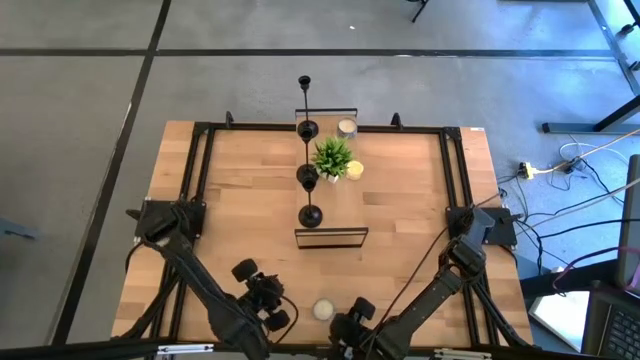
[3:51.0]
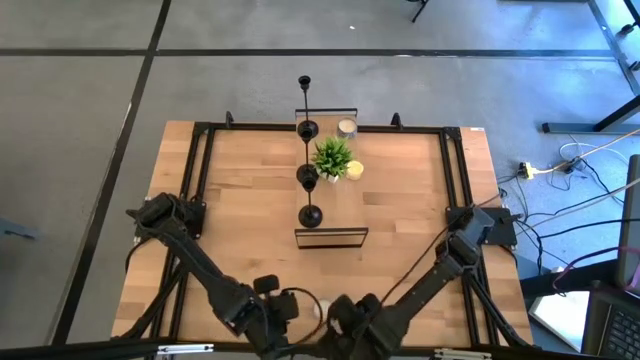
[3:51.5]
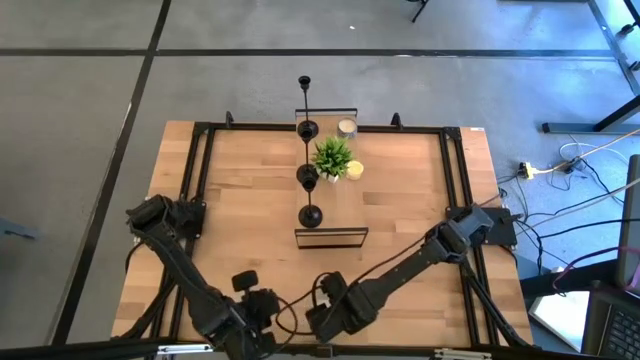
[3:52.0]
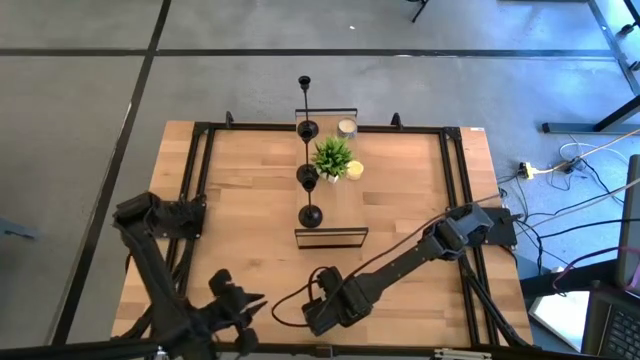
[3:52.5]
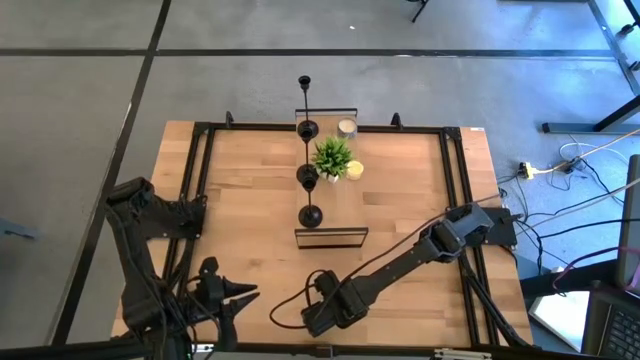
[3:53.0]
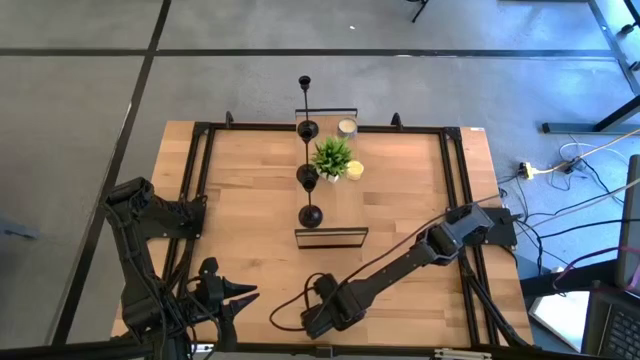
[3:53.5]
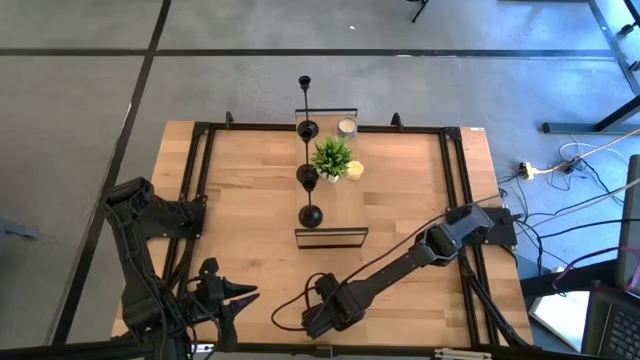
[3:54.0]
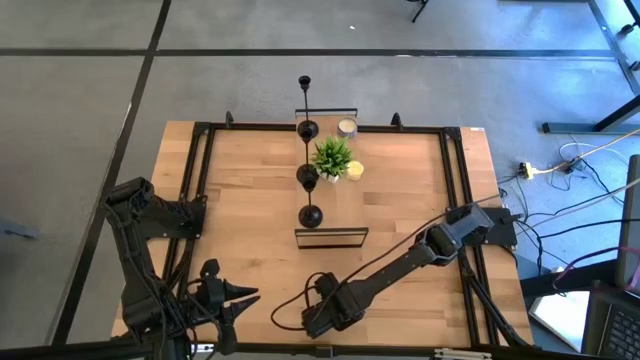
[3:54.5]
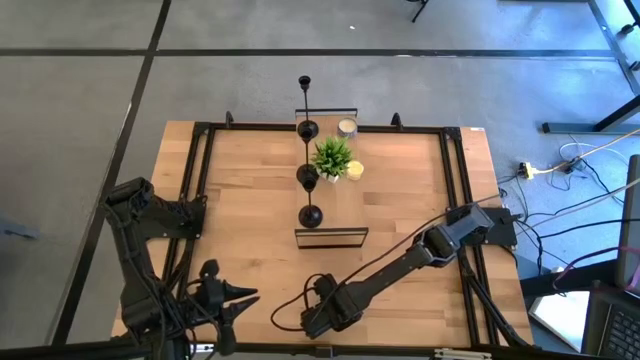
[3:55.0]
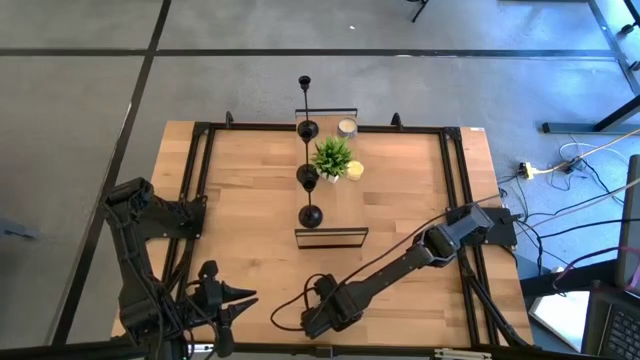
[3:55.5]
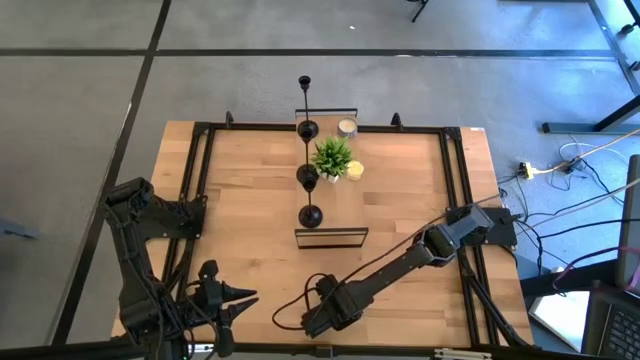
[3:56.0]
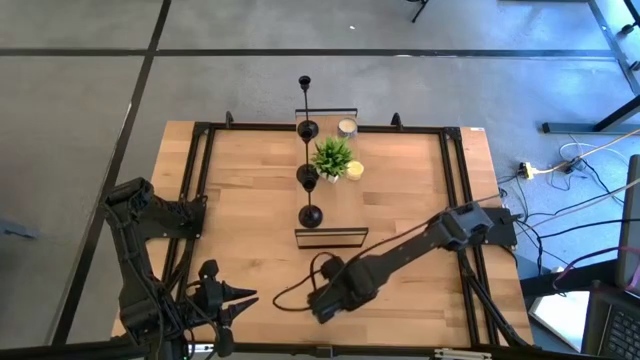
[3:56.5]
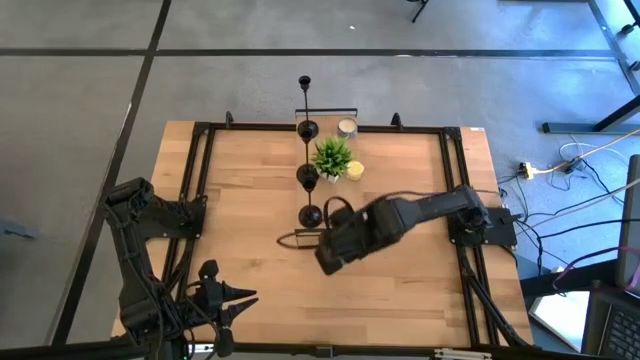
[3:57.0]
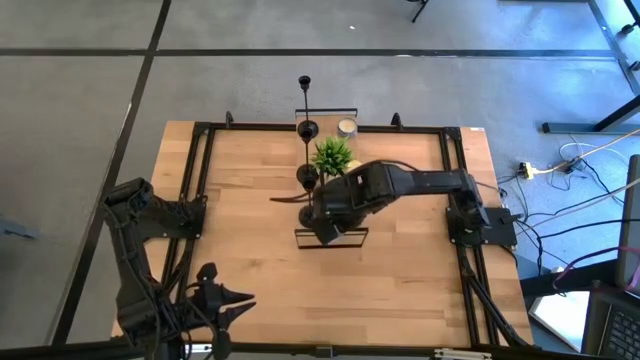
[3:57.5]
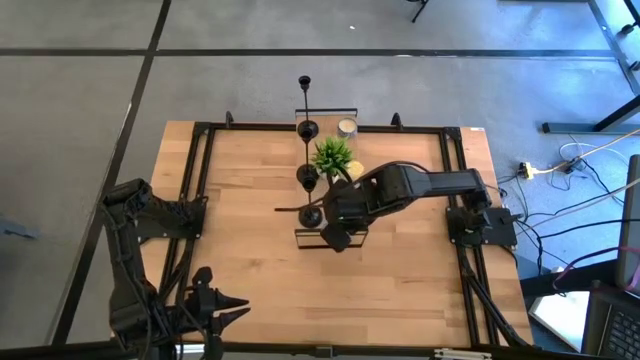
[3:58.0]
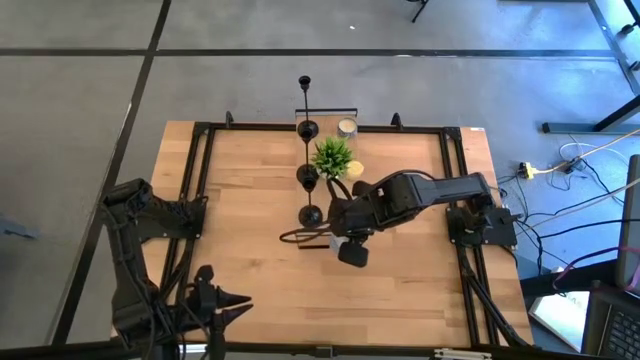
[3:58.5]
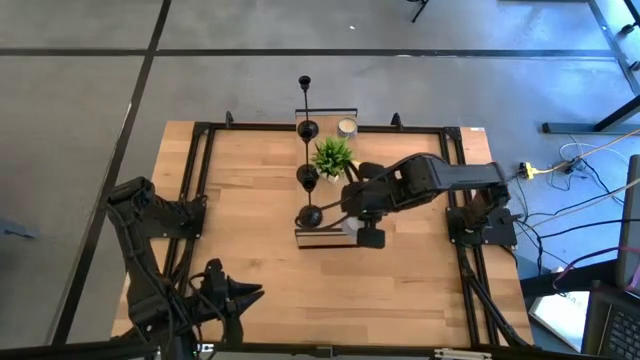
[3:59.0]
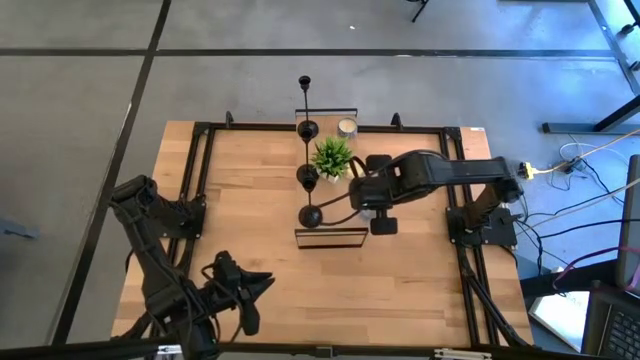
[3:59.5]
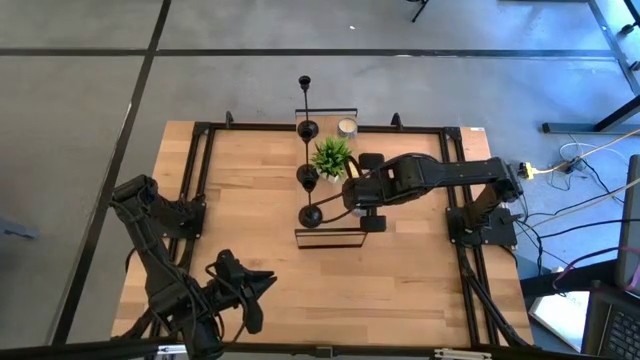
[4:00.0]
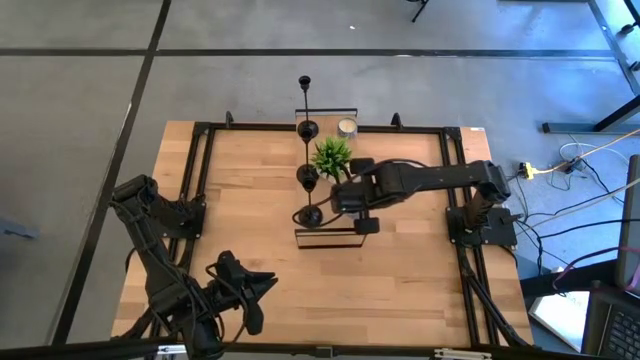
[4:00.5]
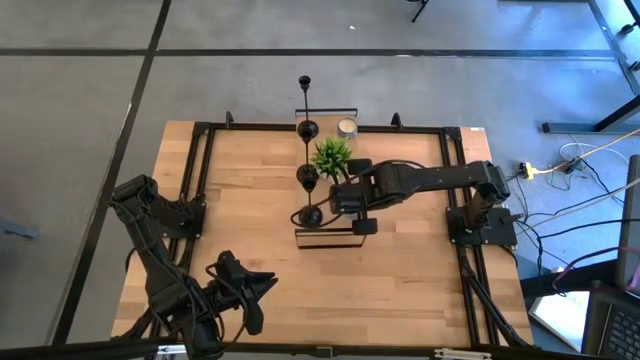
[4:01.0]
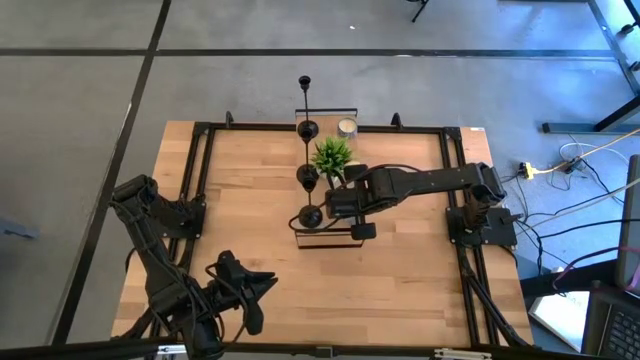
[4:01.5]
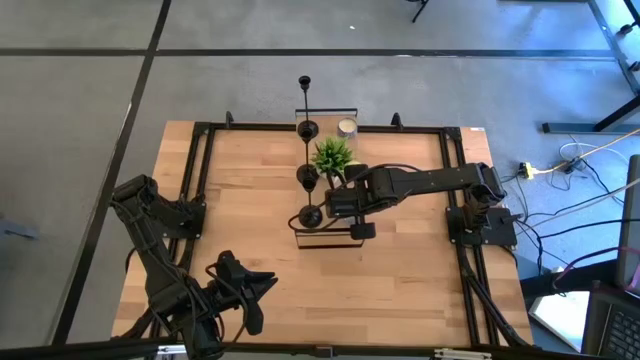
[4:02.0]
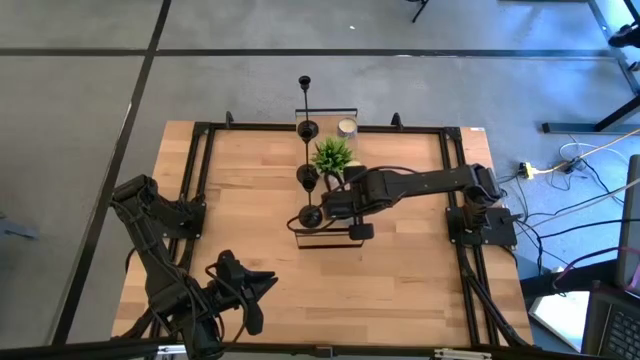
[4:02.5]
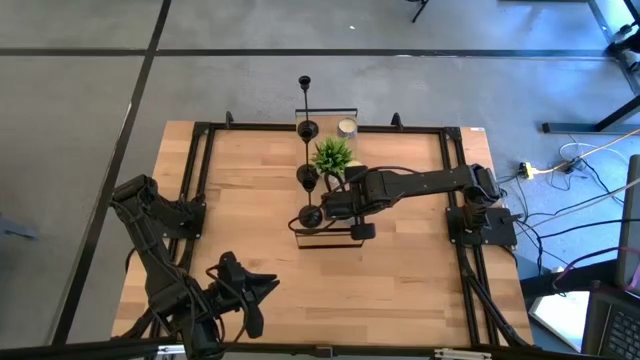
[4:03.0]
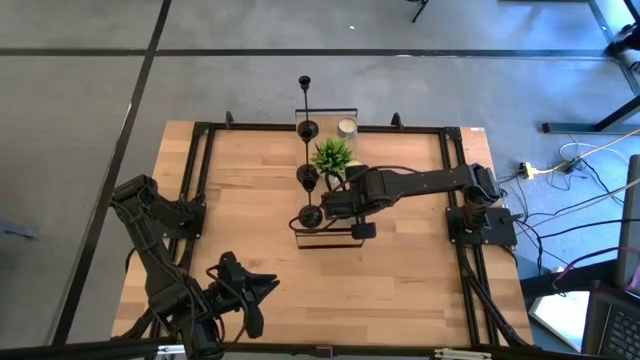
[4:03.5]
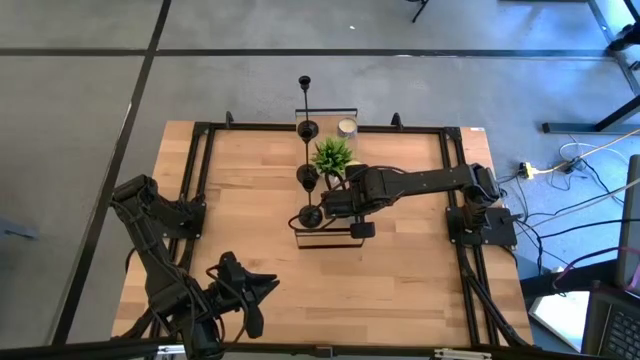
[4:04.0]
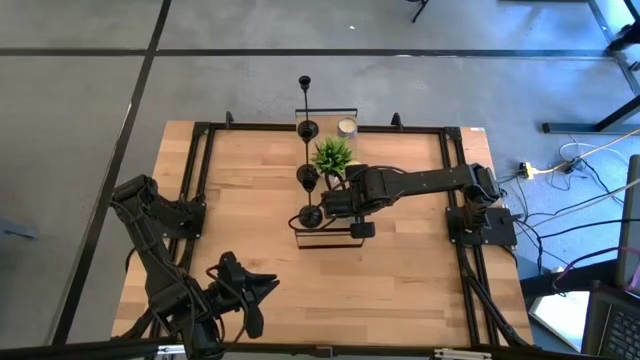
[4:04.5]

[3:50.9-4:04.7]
Task: Pick & Place candle stick holders
Put the blue scented candle on the shelf

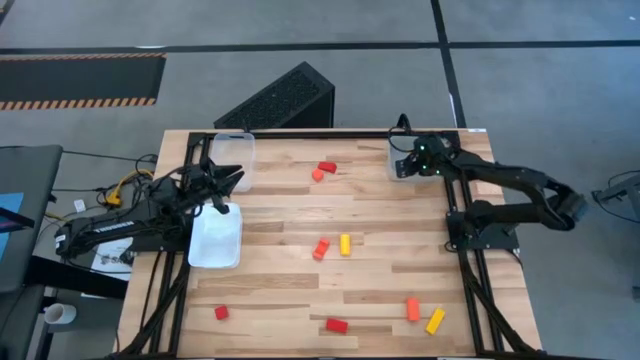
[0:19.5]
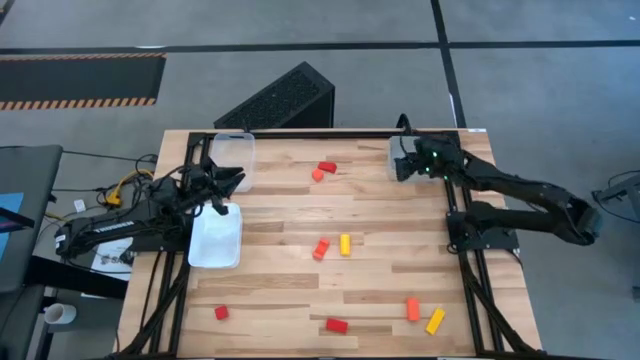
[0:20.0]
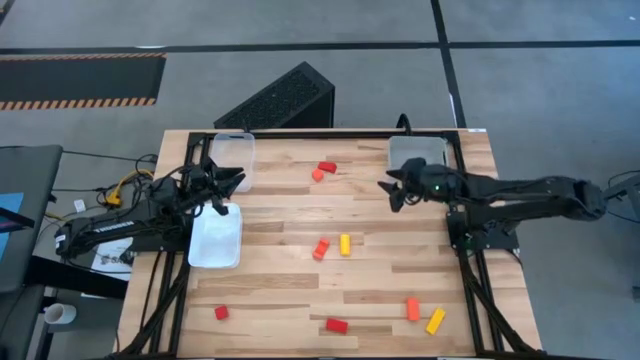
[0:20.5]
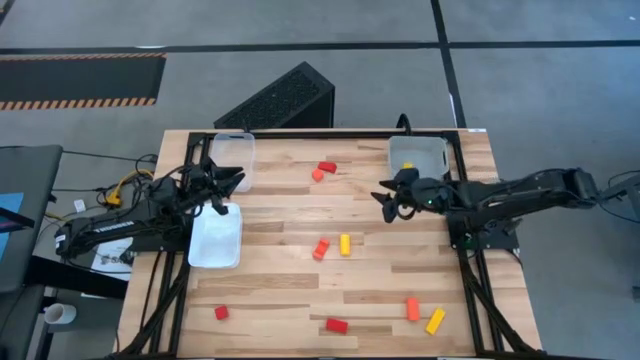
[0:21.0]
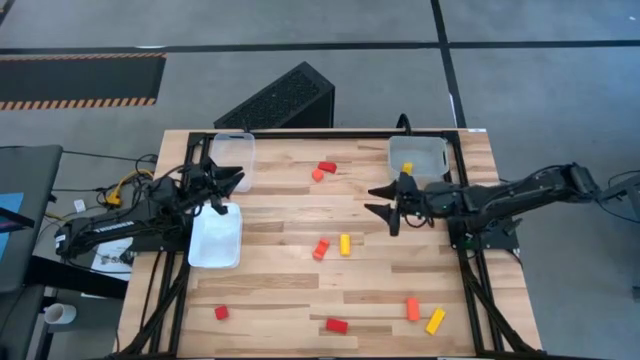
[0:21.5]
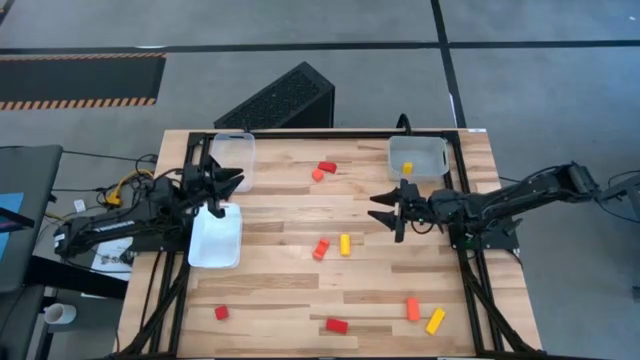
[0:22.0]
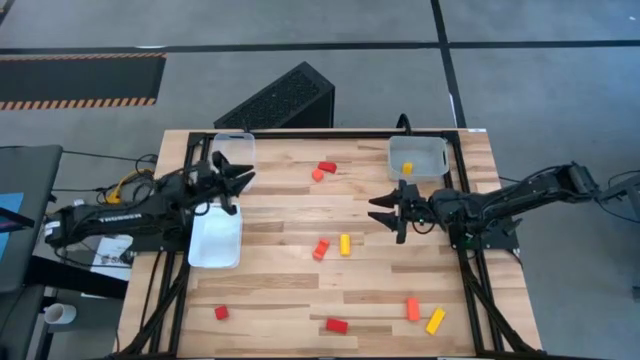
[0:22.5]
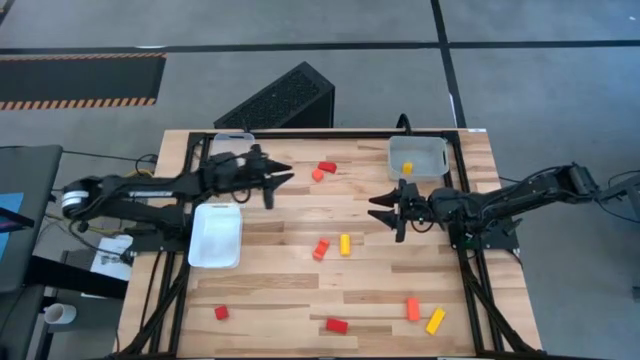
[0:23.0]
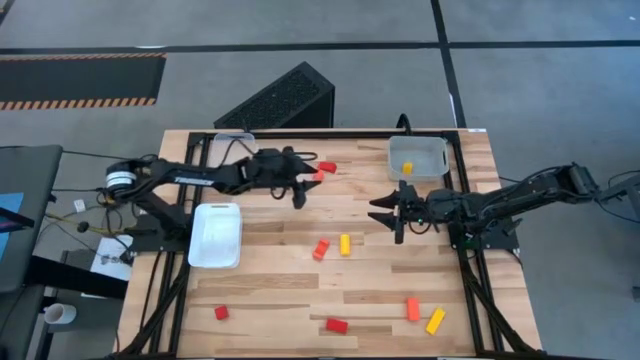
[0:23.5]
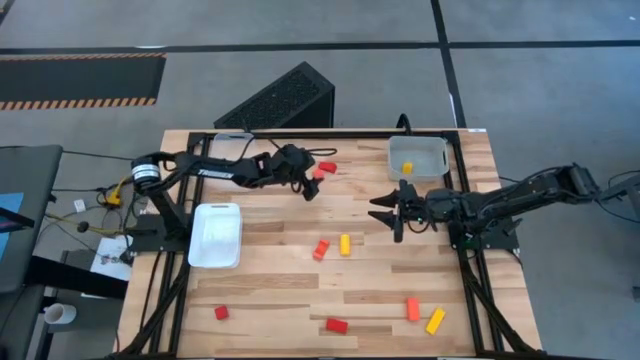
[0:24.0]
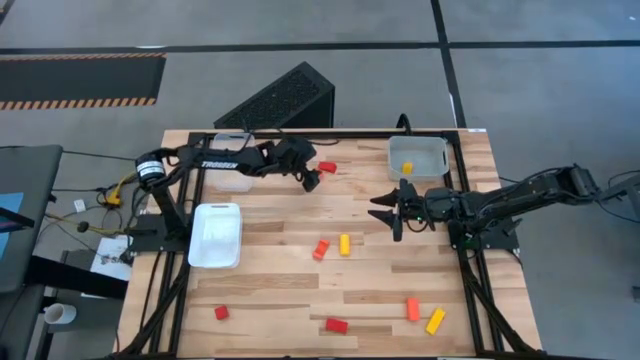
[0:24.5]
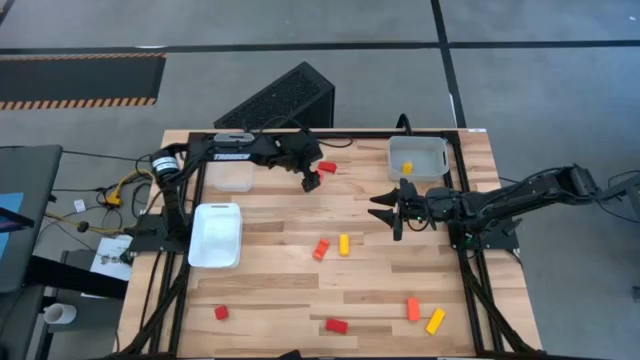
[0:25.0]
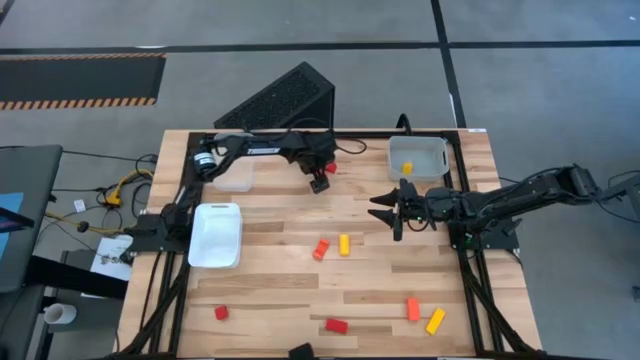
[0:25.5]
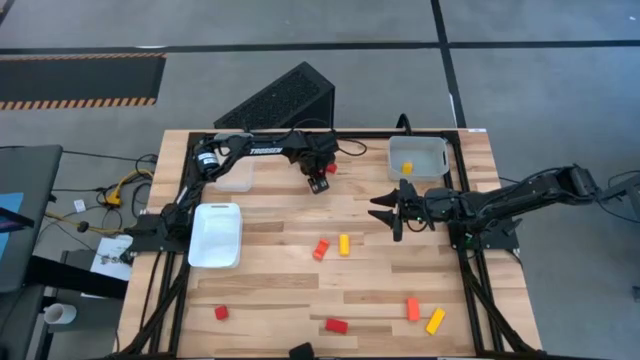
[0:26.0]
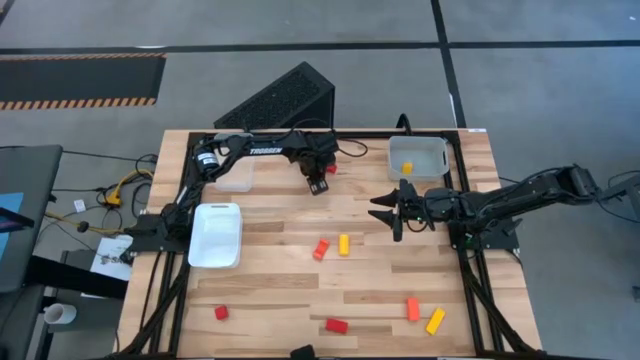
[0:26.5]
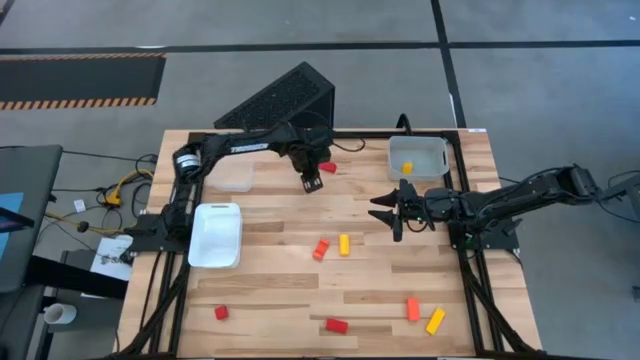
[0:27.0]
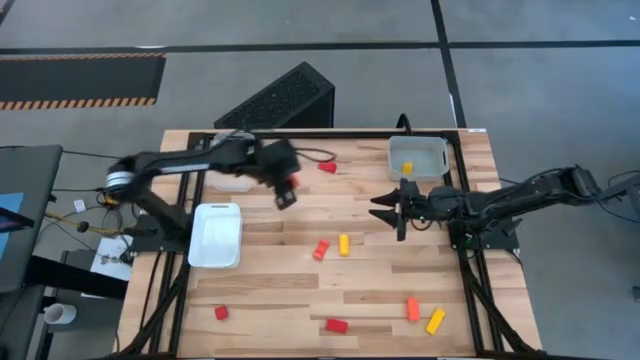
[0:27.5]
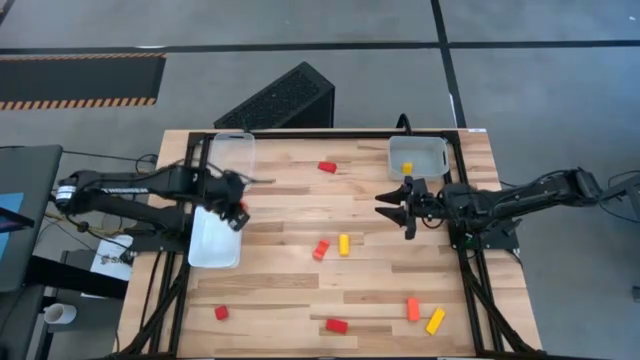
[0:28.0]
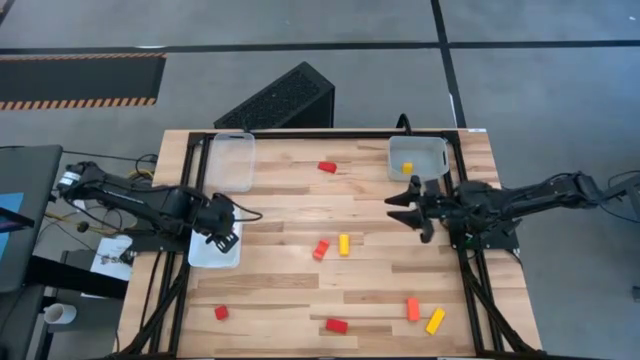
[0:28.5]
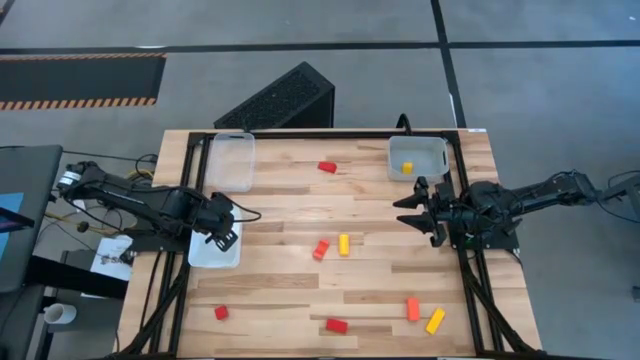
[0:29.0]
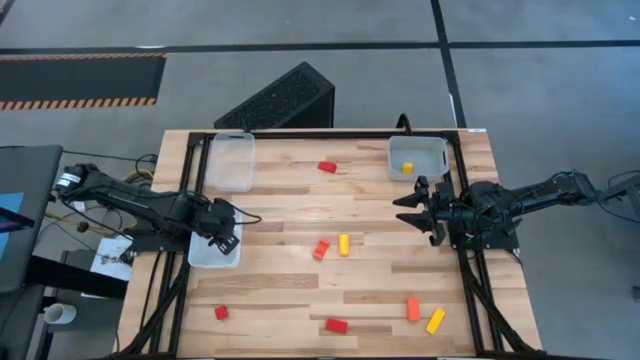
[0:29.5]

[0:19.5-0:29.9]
Task: Sort & place blocks by color
Put the top orange block into the white bin
